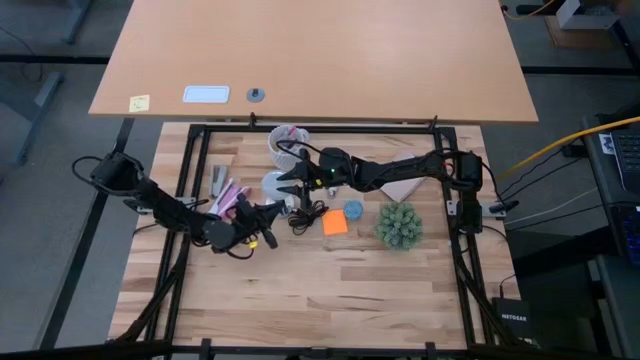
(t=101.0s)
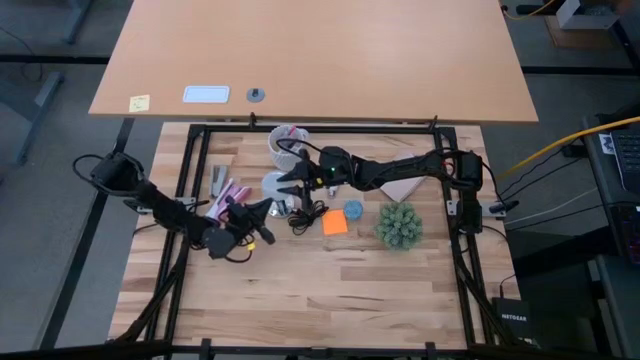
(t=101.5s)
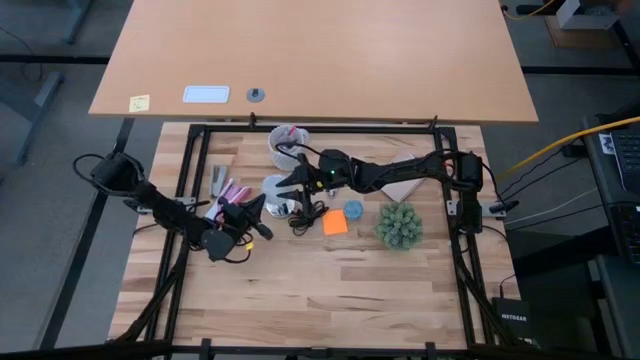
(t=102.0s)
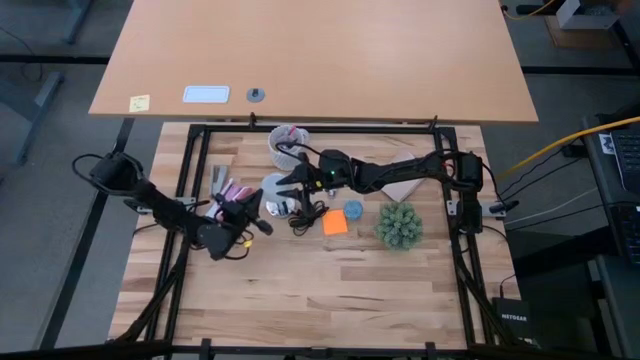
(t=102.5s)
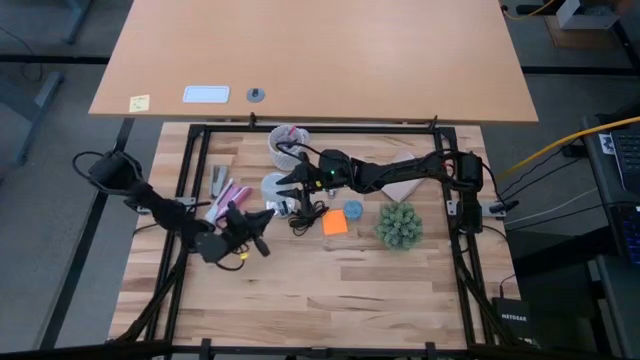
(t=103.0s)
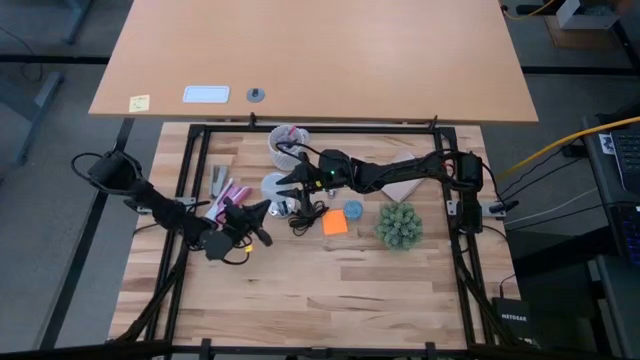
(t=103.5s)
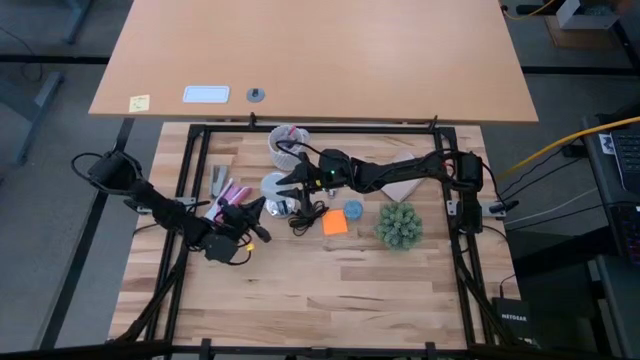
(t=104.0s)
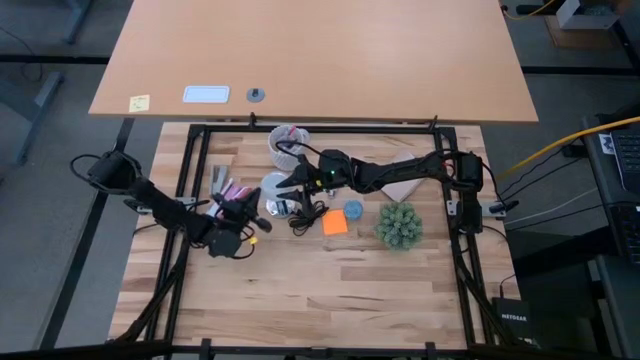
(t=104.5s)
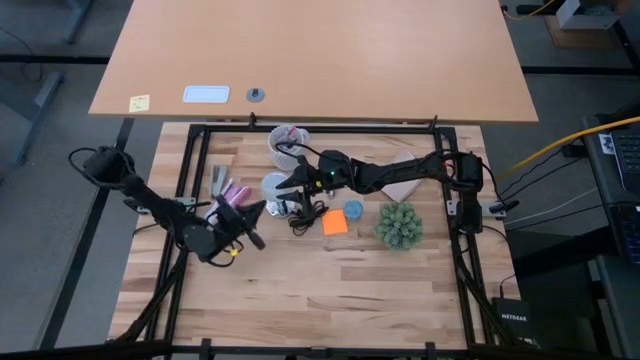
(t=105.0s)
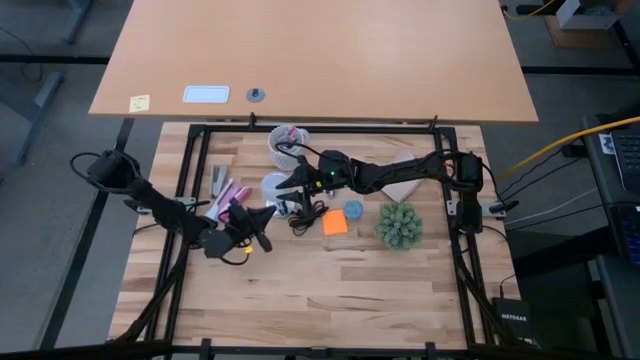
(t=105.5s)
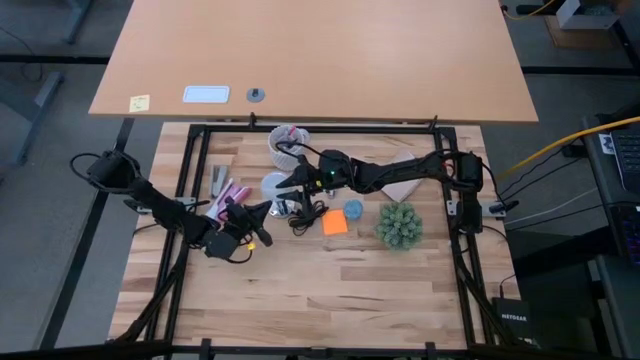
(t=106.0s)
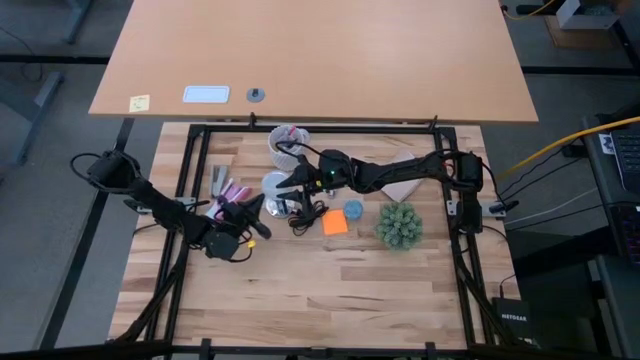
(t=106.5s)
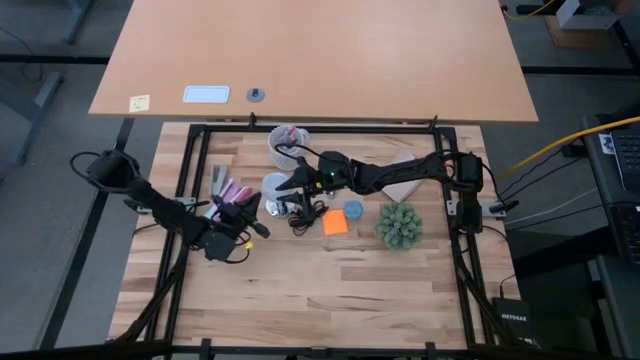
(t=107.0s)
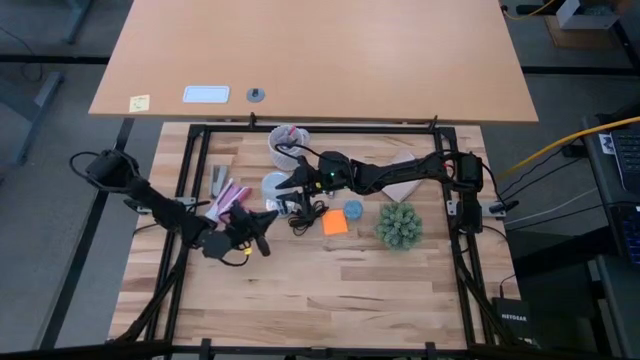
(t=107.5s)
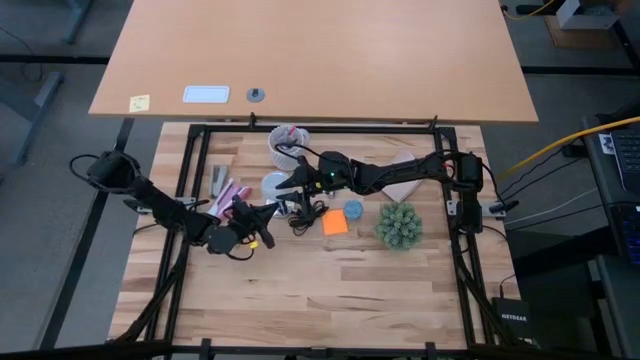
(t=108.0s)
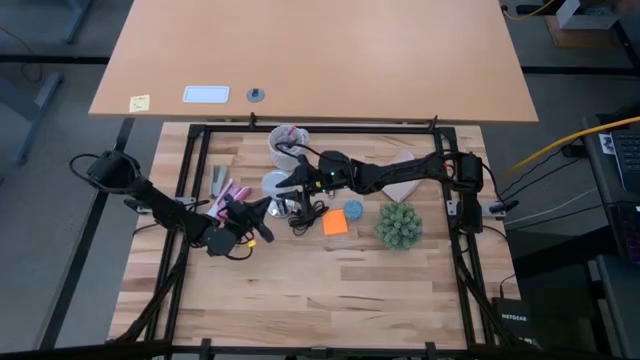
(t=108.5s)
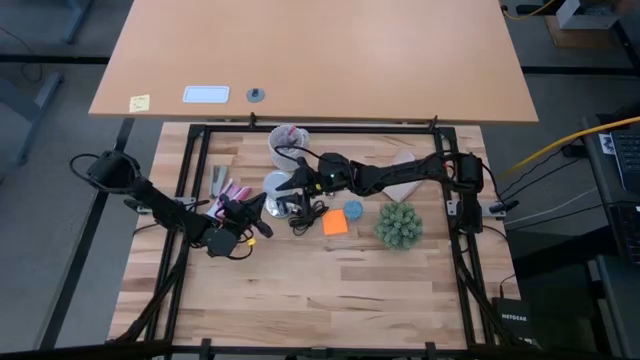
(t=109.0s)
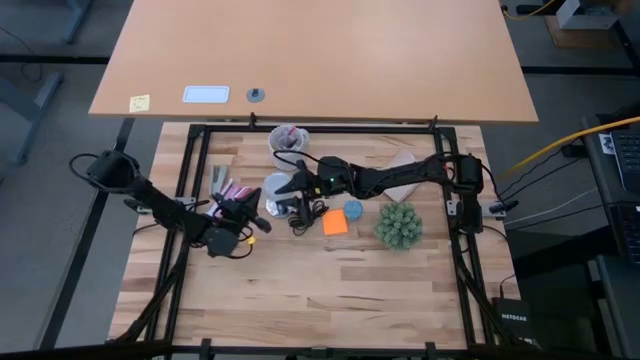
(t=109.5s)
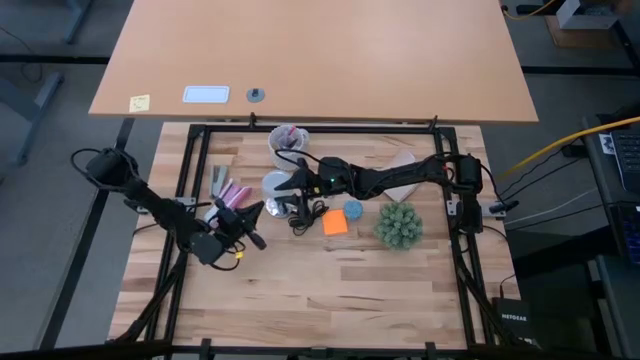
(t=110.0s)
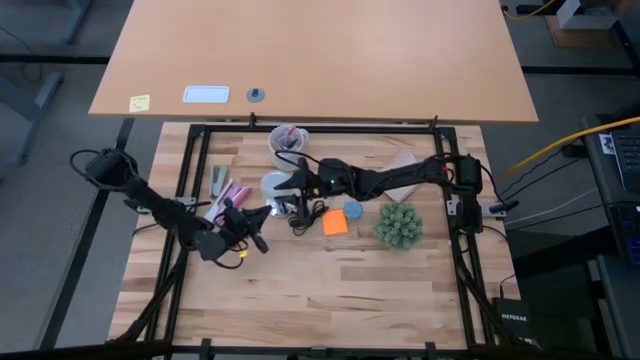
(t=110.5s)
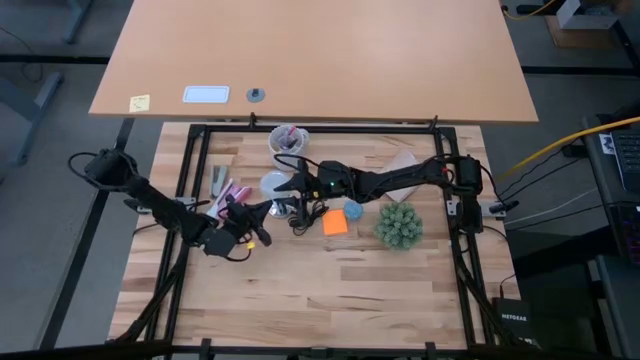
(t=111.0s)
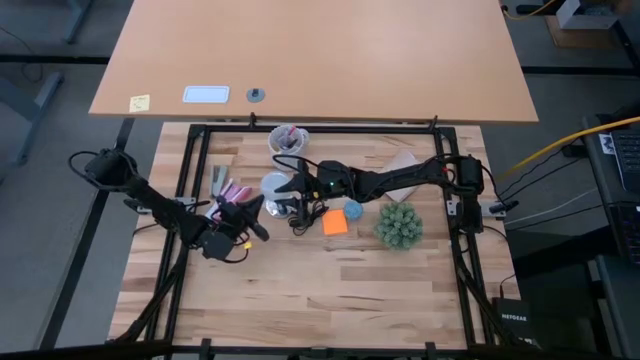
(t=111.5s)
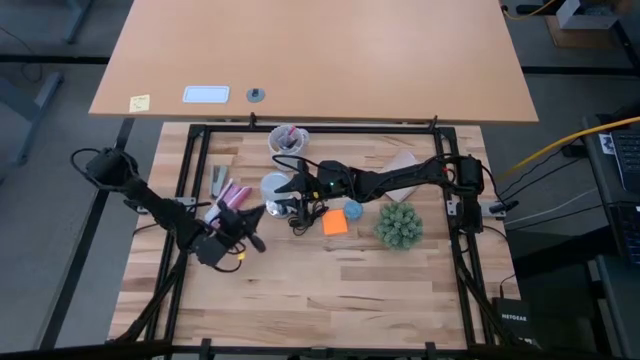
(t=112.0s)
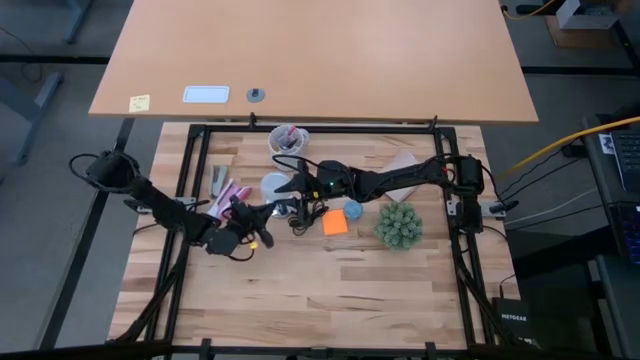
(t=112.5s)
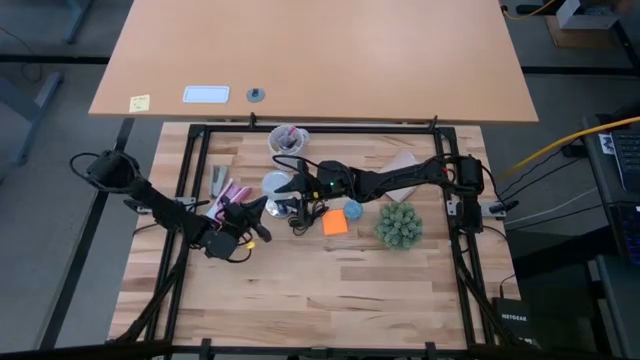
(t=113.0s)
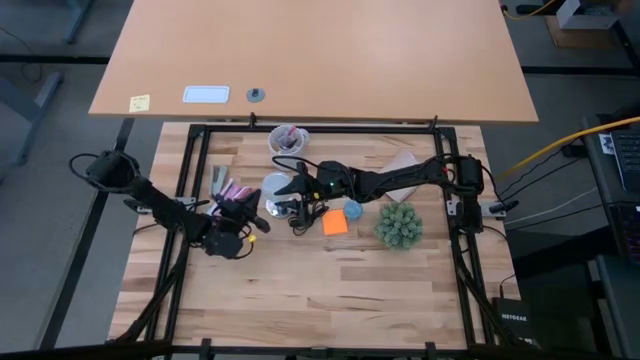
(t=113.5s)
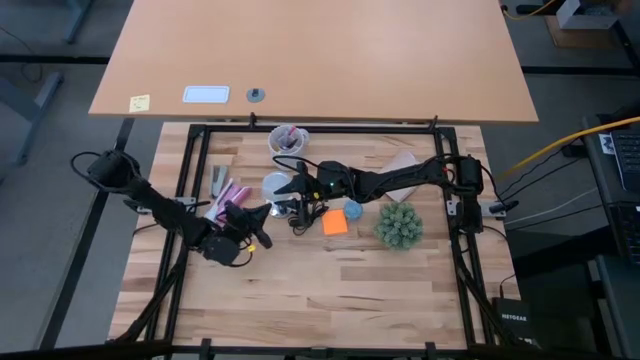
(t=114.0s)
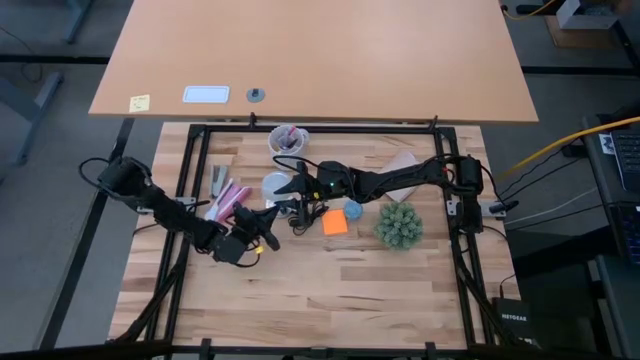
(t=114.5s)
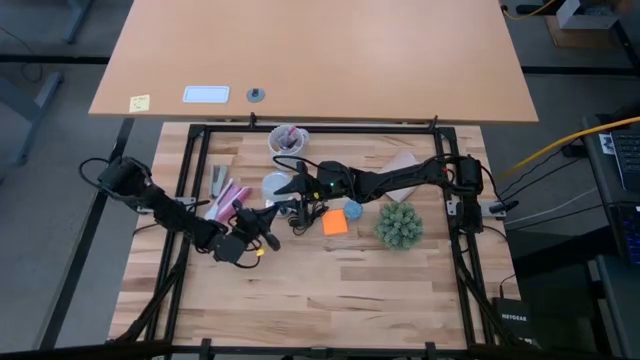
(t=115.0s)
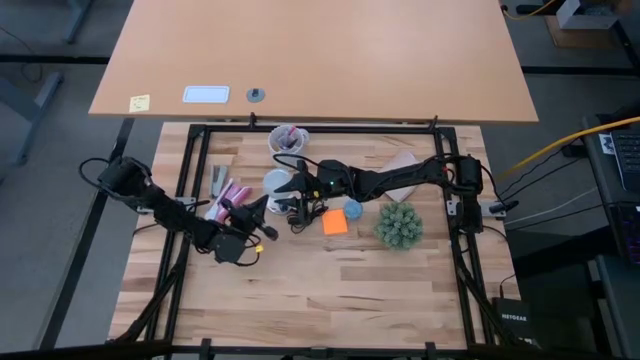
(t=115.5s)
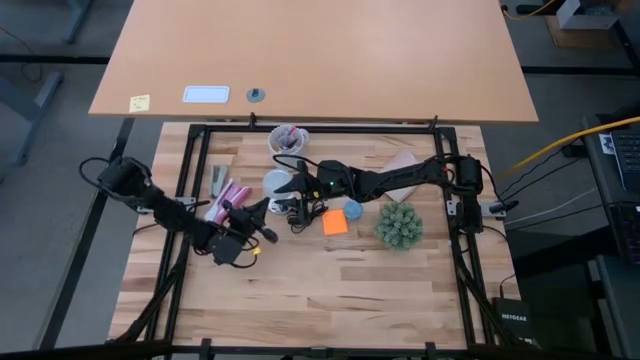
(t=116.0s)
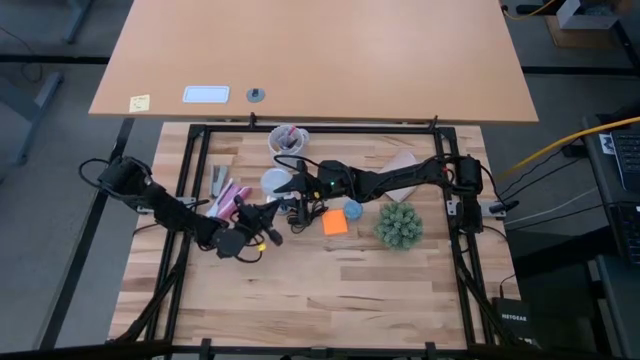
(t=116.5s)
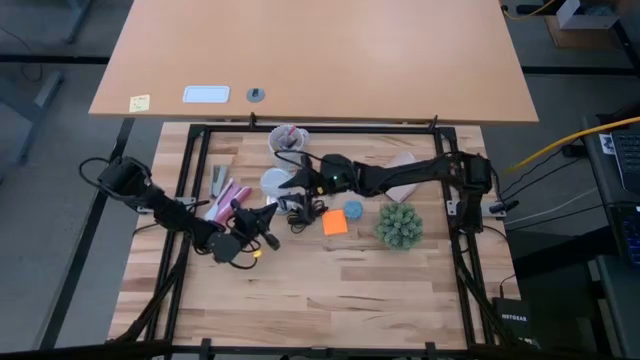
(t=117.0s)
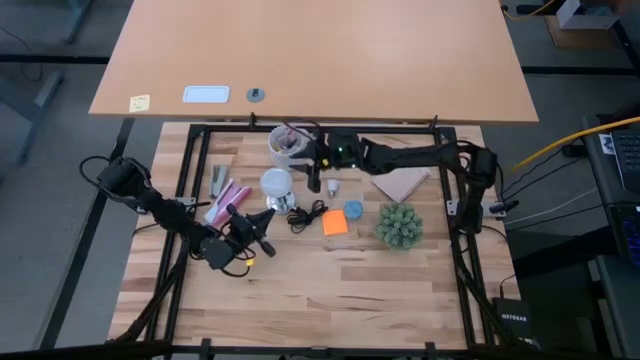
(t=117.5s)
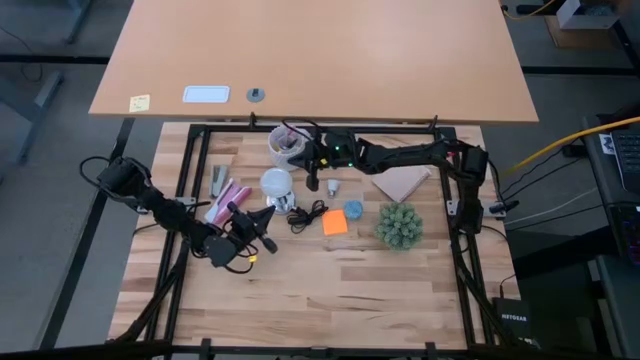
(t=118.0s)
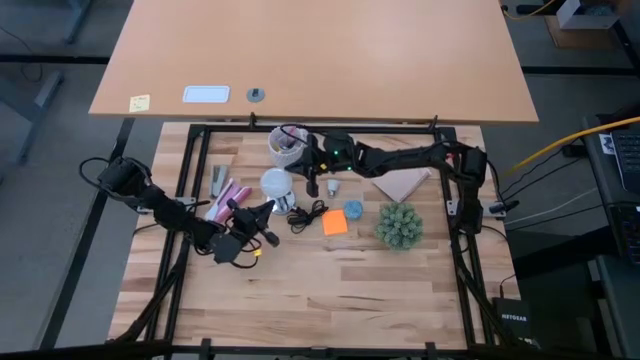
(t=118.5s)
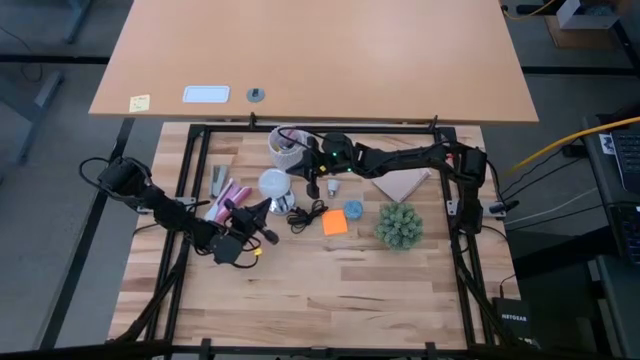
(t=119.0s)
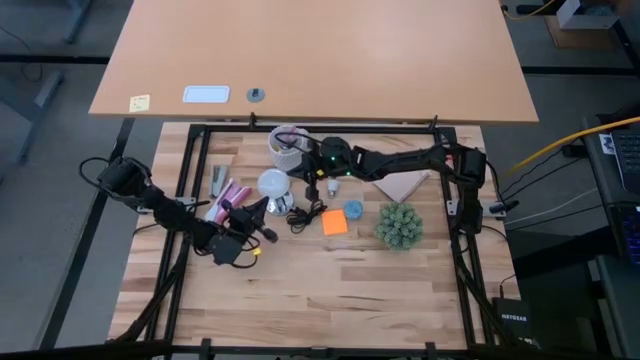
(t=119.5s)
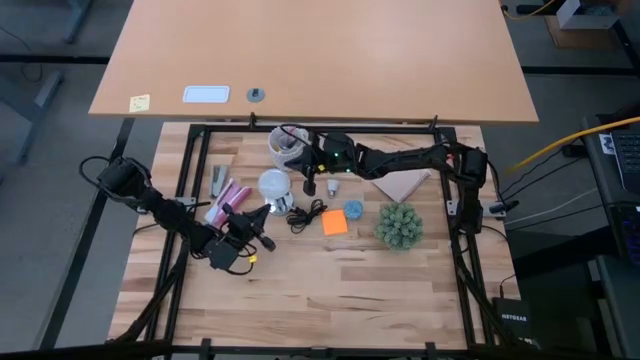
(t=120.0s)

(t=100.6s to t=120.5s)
Task: Screw lightbulb
Insert the lightbulb into the silver lamp

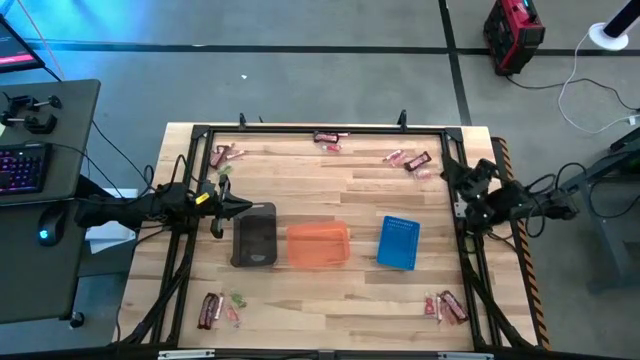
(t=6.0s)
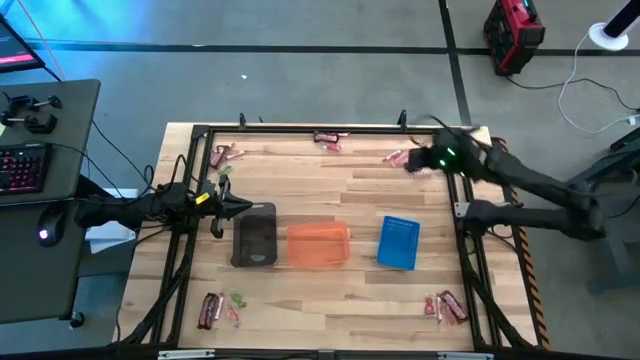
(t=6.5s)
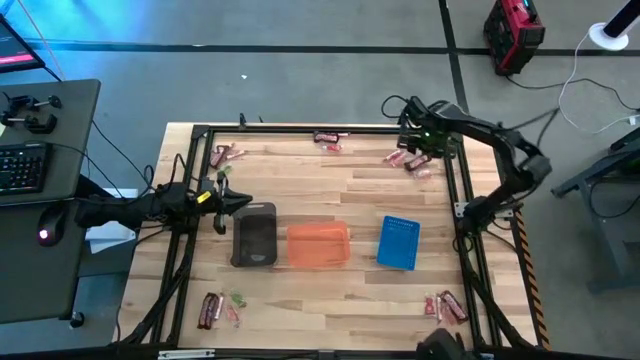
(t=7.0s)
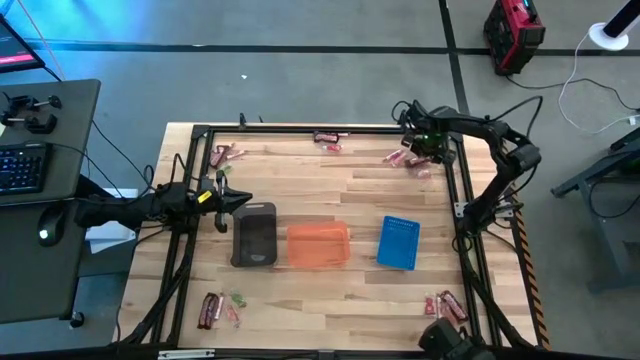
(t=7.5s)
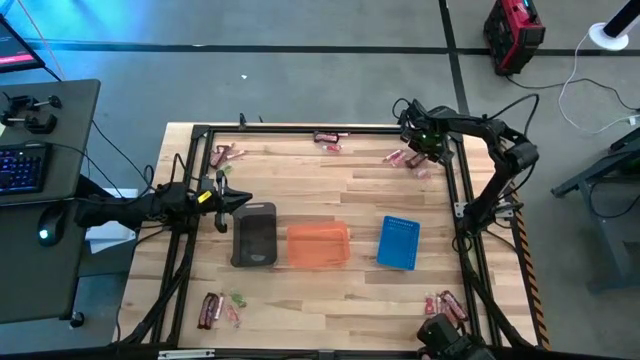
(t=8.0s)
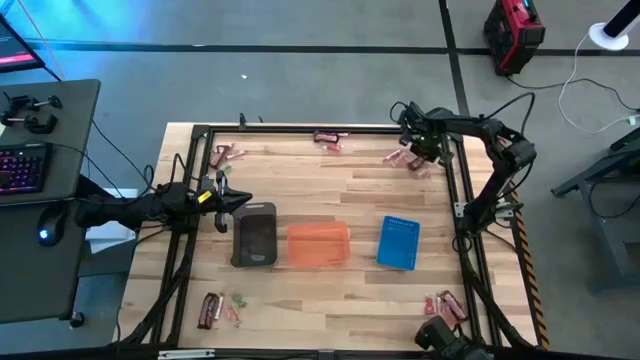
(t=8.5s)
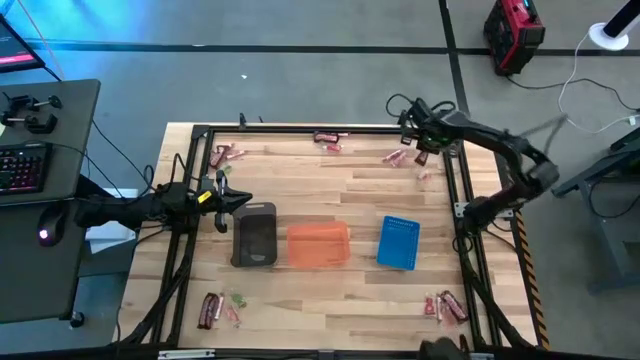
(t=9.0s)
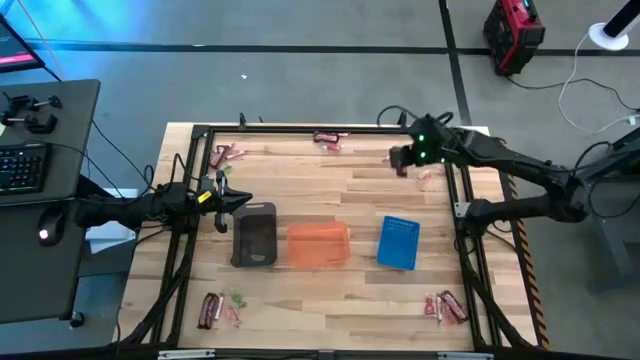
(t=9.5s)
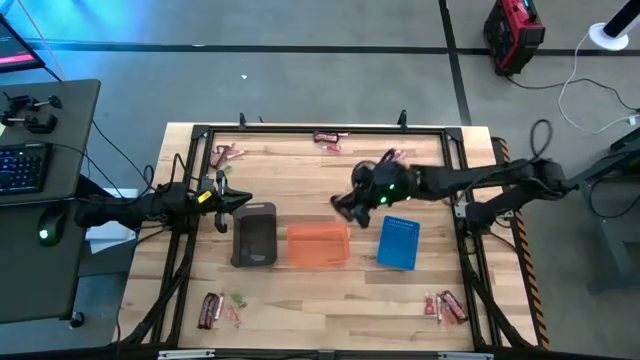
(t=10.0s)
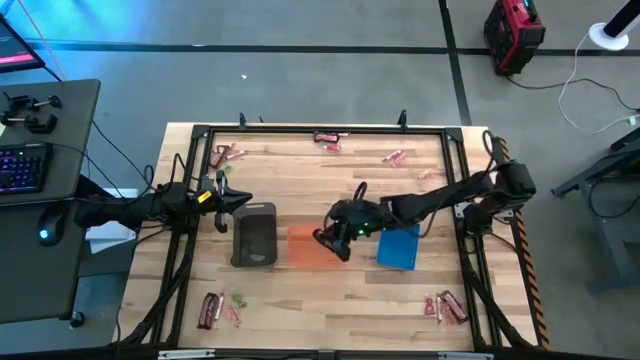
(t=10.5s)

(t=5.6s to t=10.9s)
Task: Sort candy by brand, put in halloween buckets
Put the brown chocolate into the orange bin
